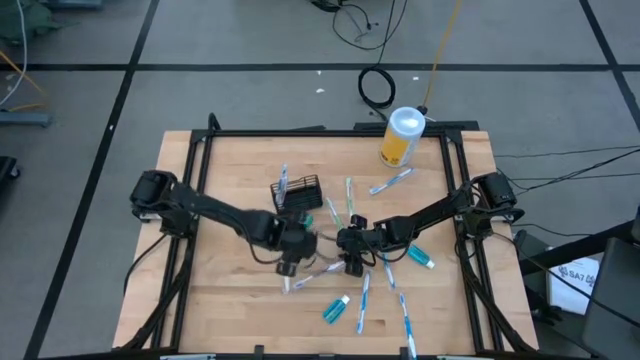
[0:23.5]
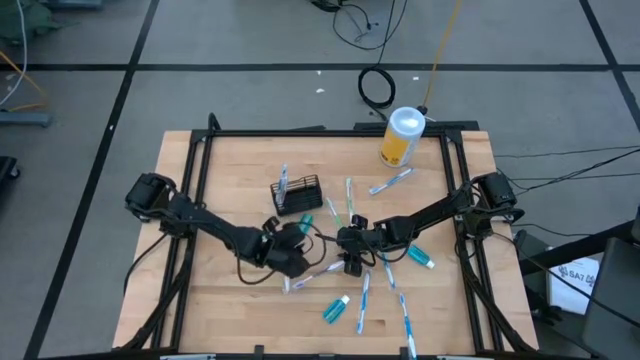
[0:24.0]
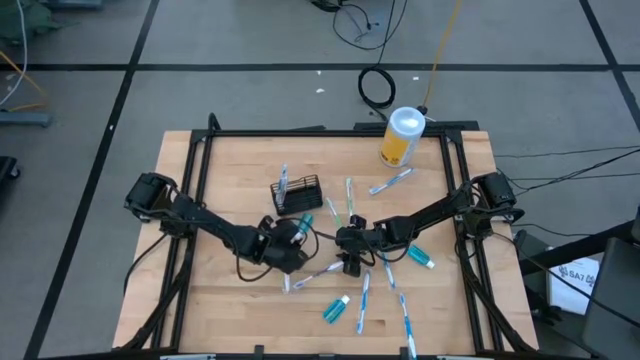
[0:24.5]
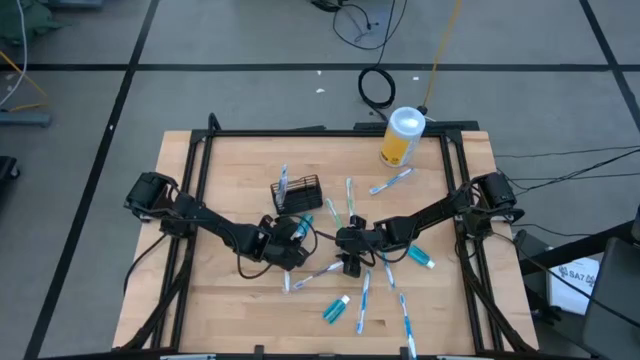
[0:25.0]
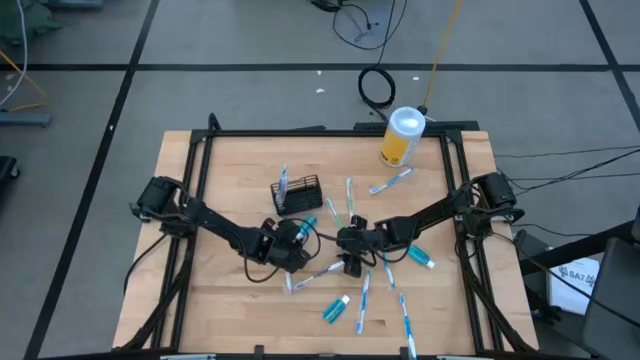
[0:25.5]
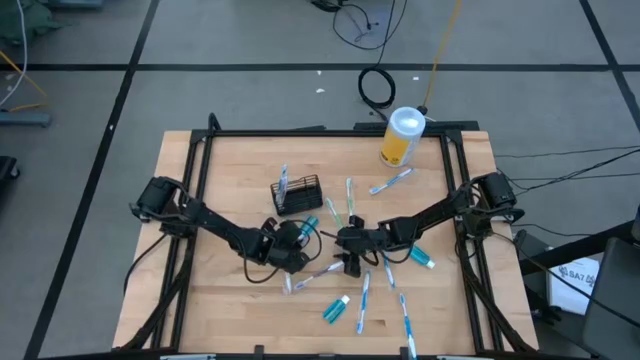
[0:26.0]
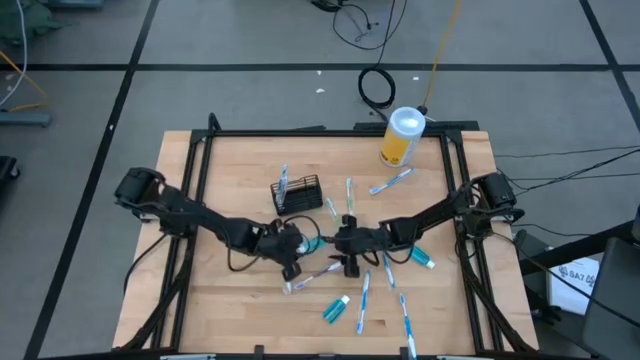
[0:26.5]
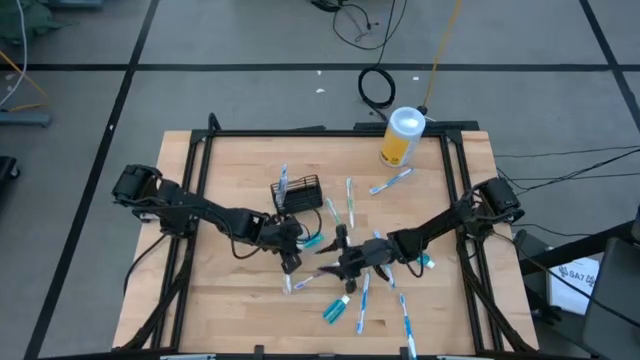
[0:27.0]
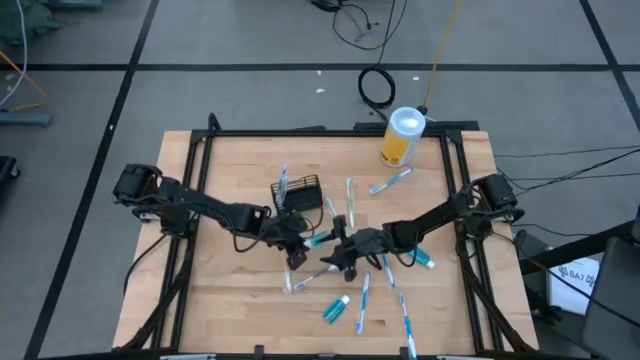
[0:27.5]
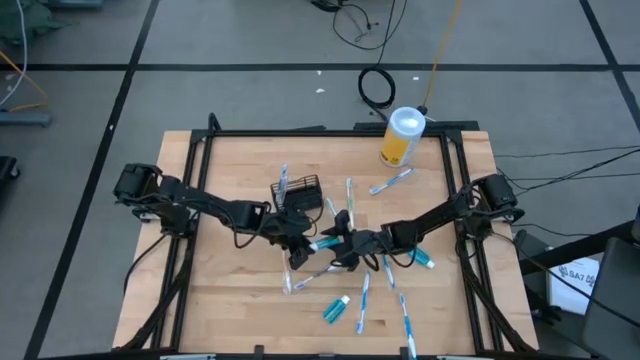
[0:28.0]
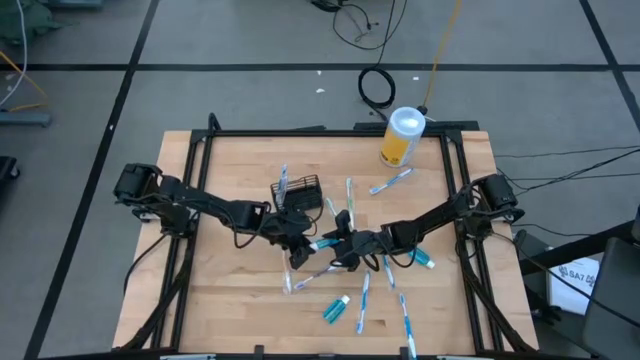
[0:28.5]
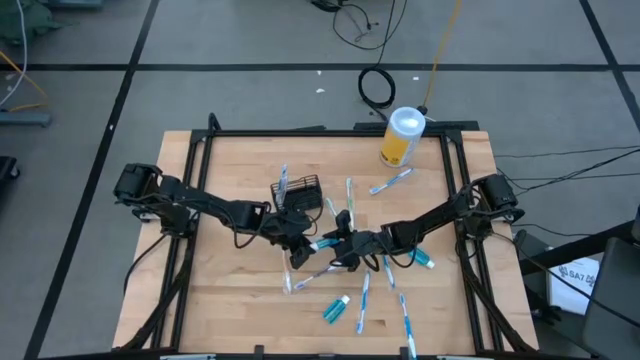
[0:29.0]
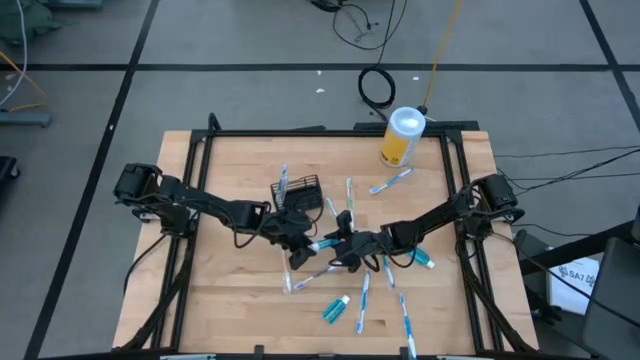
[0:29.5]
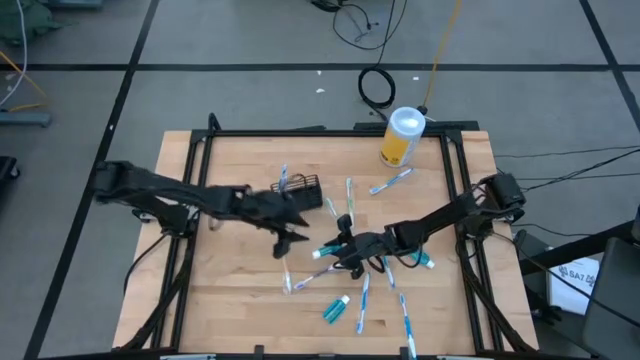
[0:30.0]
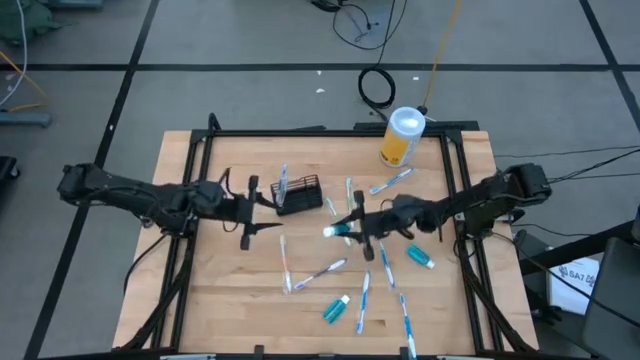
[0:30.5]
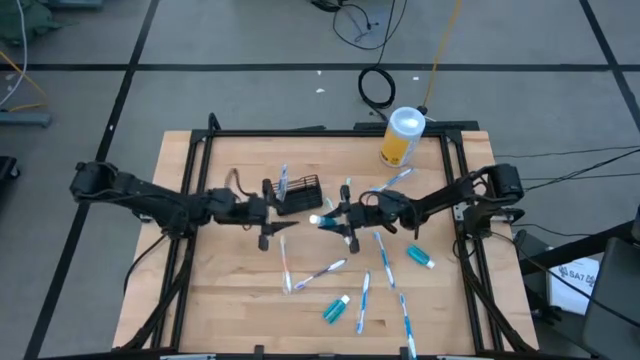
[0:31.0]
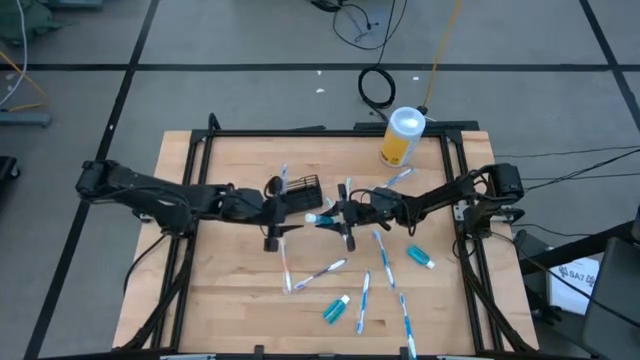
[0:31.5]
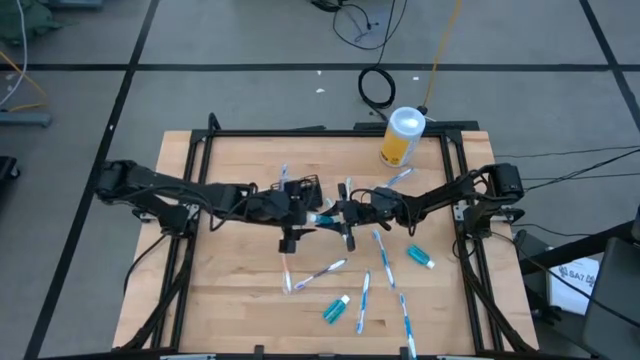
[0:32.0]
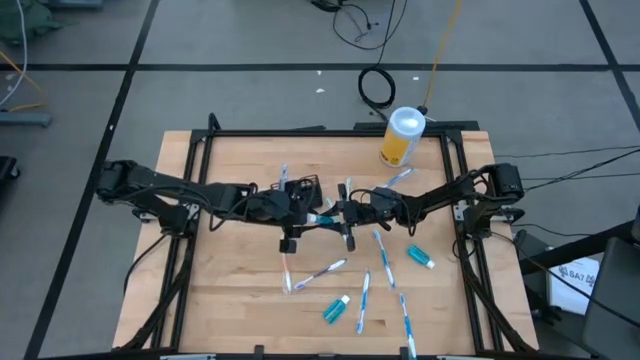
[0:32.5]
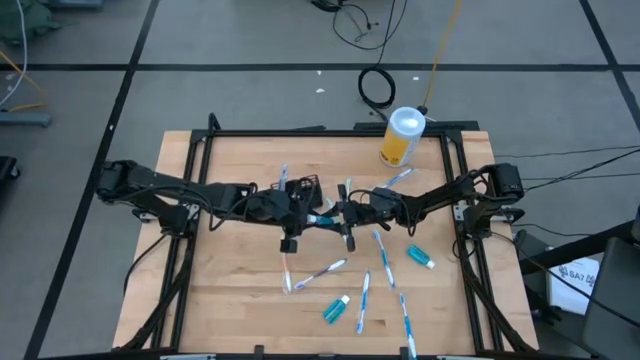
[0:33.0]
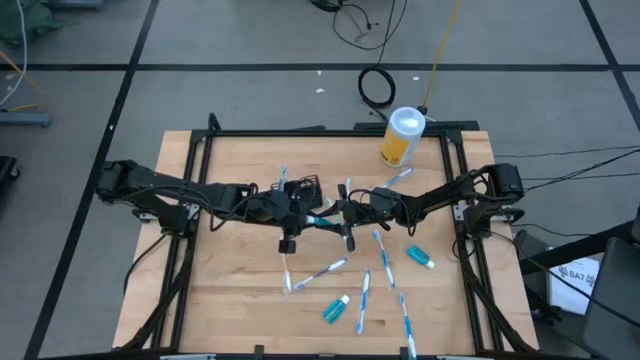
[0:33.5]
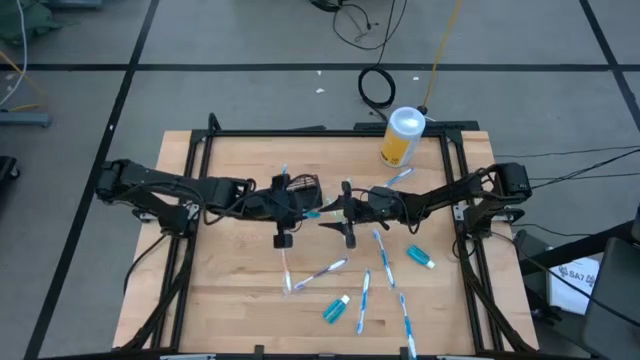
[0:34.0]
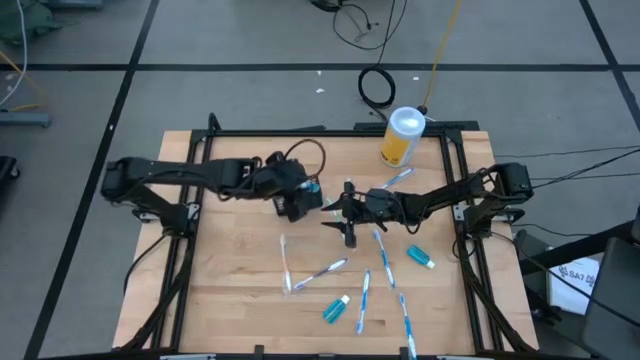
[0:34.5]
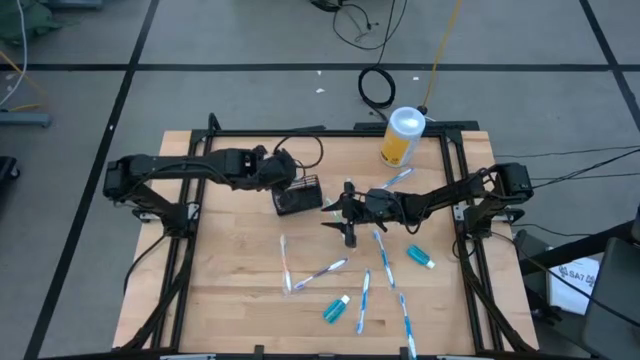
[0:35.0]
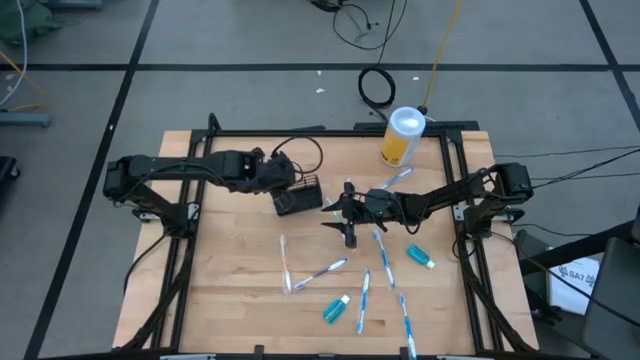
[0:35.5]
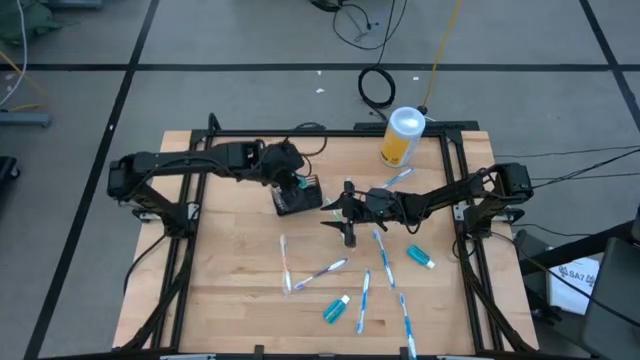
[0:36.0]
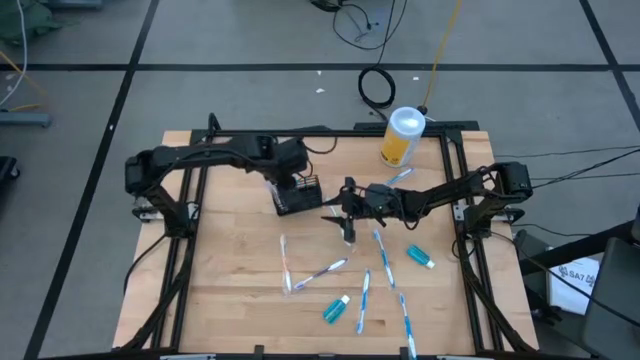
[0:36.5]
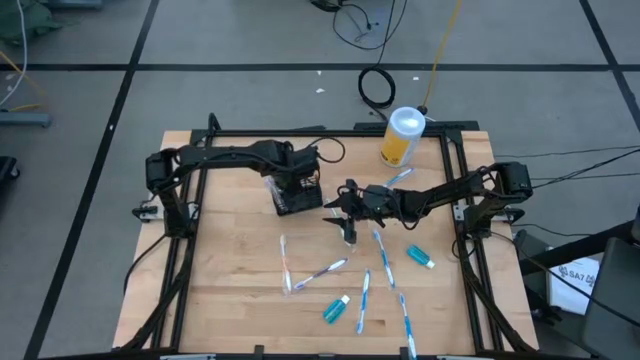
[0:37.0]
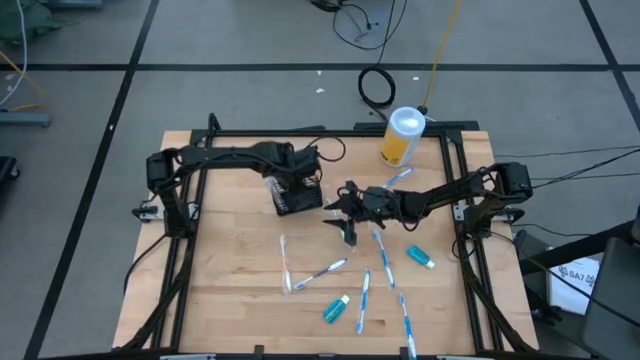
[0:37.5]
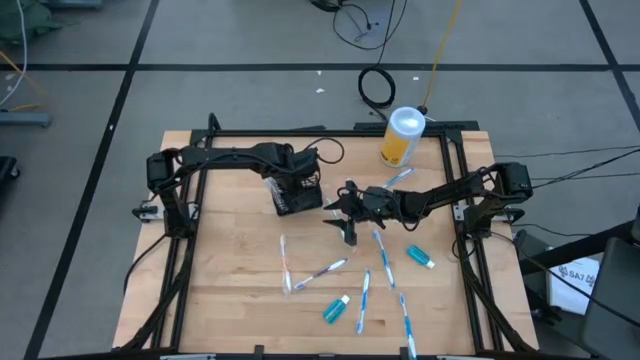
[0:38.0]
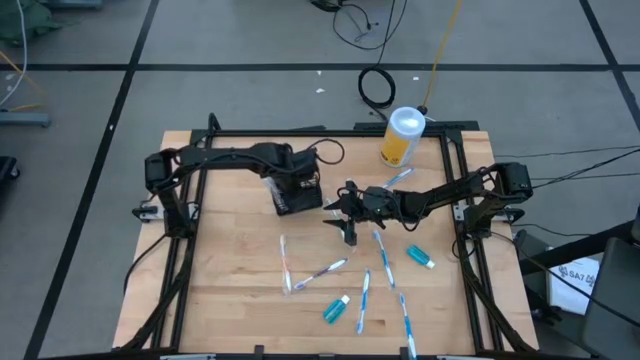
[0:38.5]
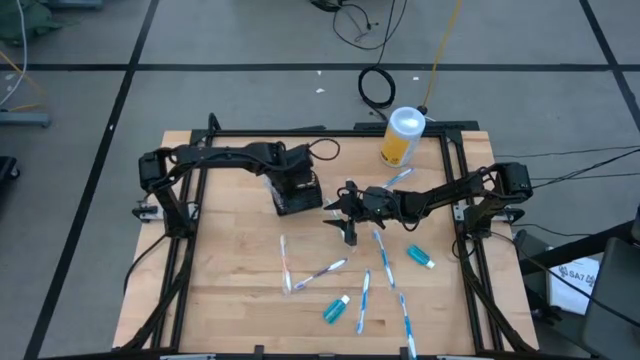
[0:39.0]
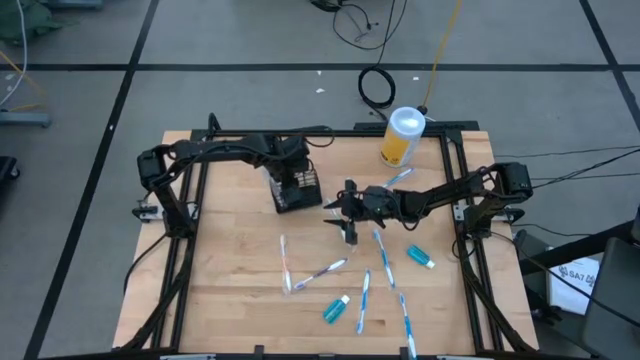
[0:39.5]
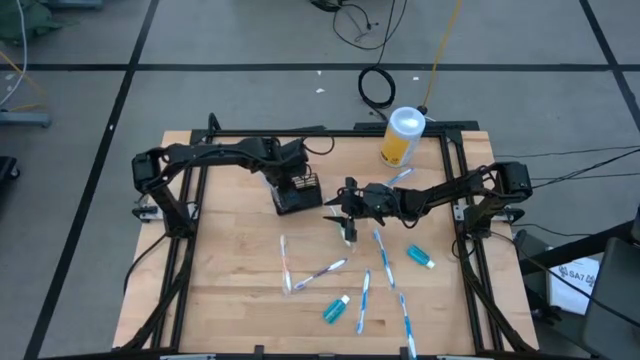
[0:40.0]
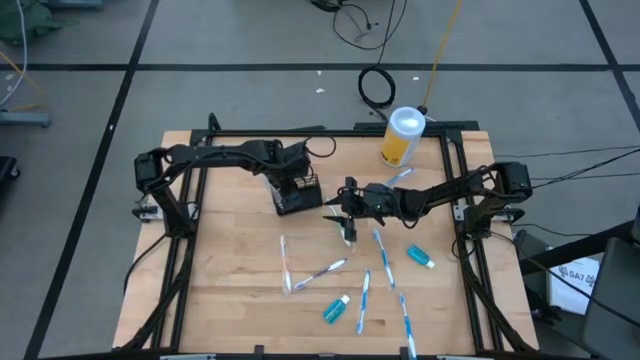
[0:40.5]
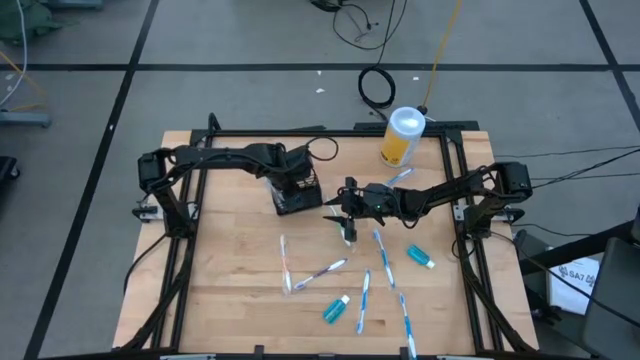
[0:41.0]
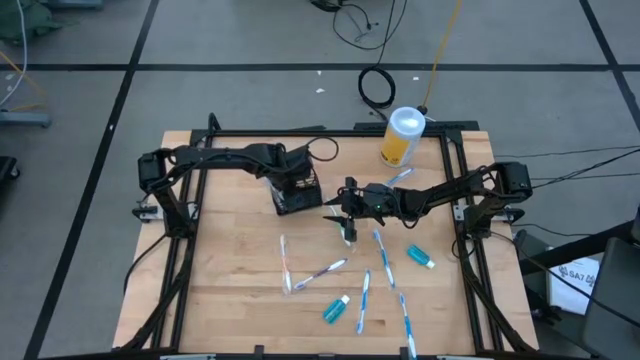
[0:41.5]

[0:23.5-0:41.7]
Task: Pick & Place toothbrushing station
Put the top left blue mouthwash into the black mesh organizer
